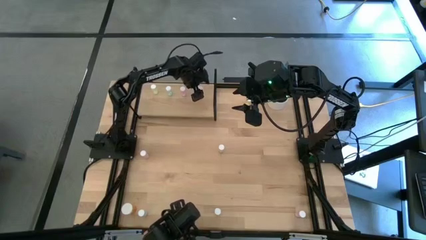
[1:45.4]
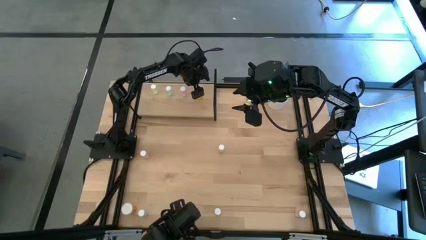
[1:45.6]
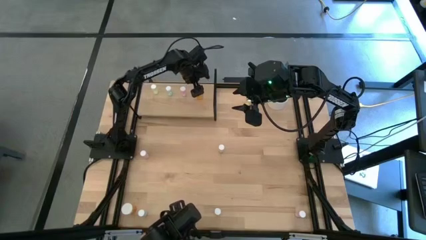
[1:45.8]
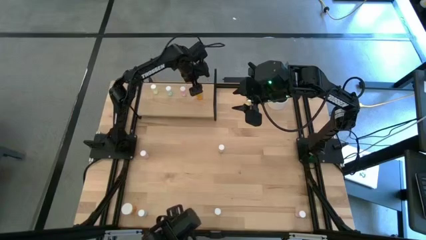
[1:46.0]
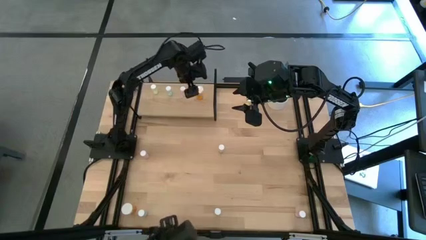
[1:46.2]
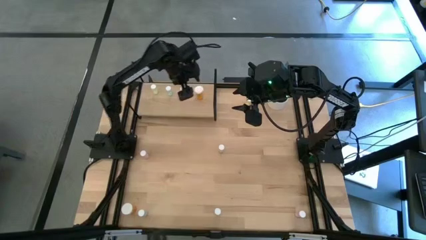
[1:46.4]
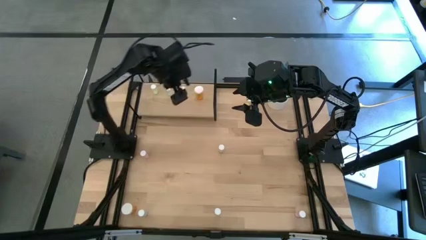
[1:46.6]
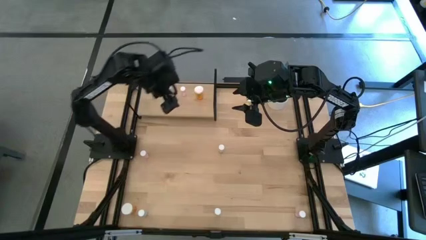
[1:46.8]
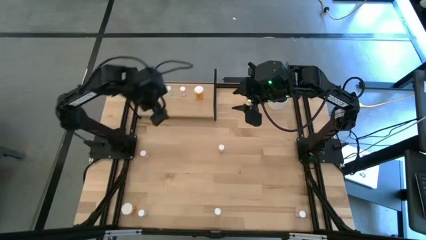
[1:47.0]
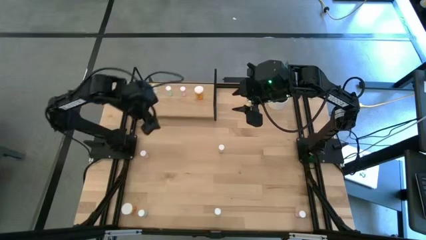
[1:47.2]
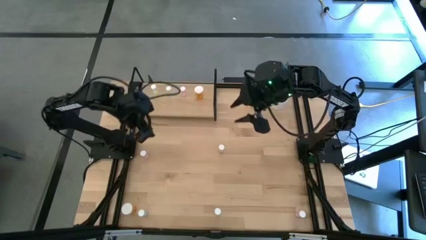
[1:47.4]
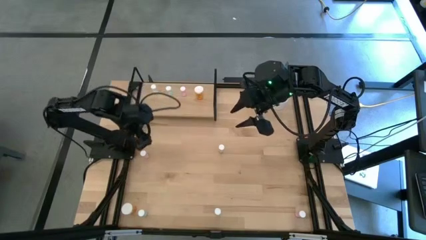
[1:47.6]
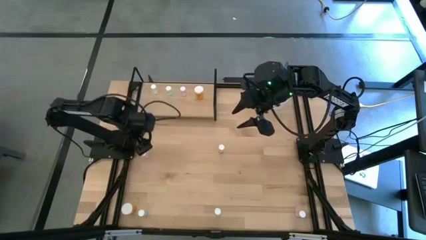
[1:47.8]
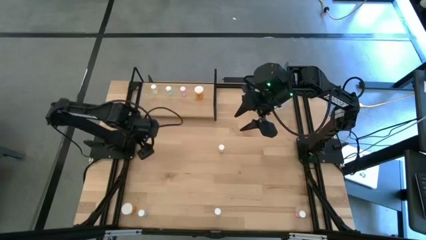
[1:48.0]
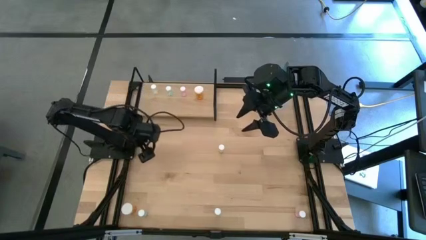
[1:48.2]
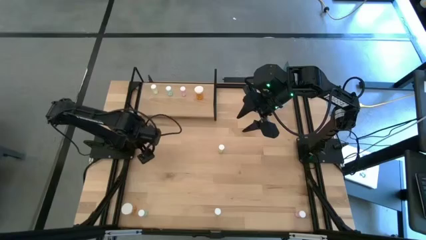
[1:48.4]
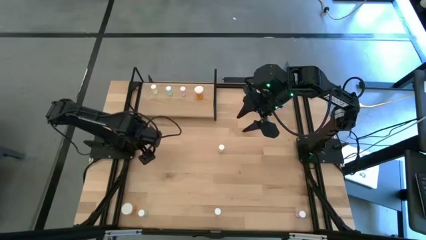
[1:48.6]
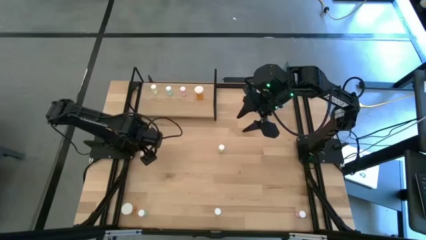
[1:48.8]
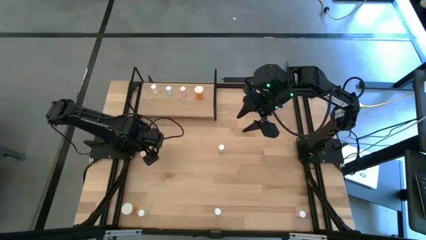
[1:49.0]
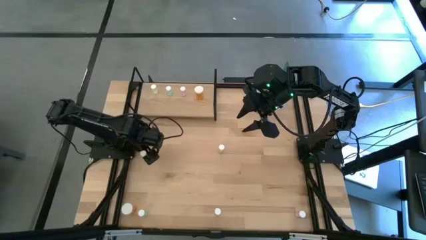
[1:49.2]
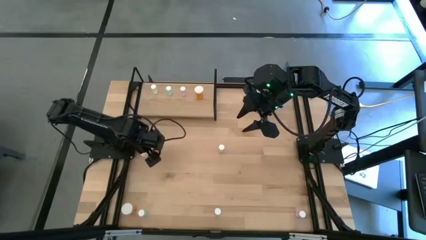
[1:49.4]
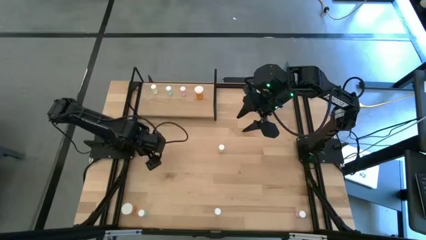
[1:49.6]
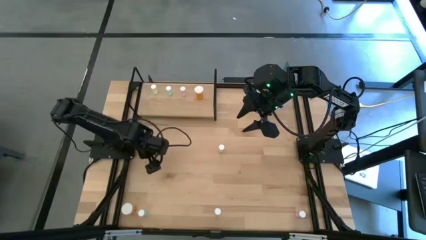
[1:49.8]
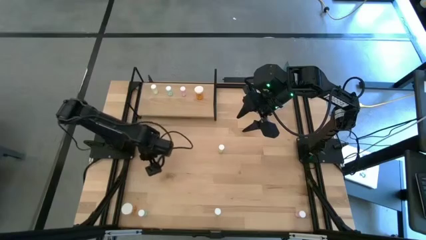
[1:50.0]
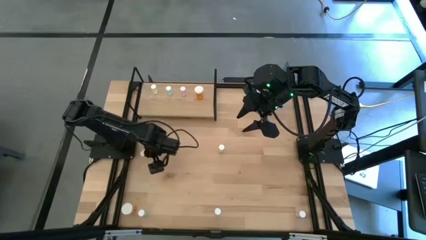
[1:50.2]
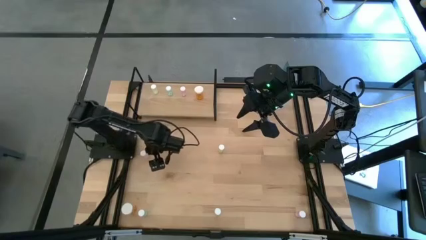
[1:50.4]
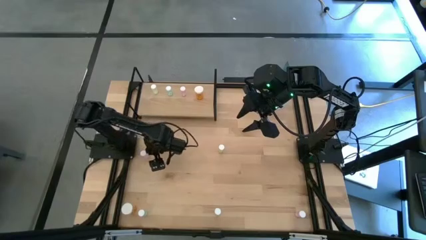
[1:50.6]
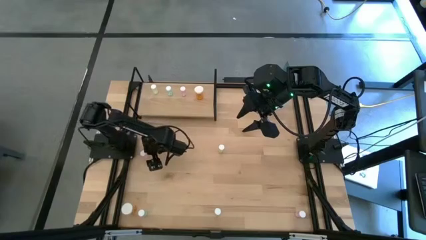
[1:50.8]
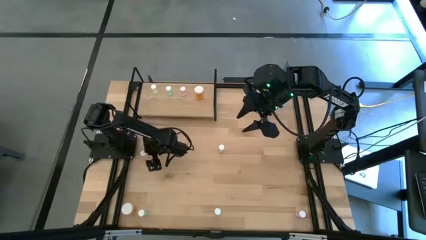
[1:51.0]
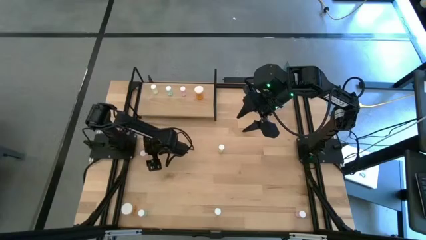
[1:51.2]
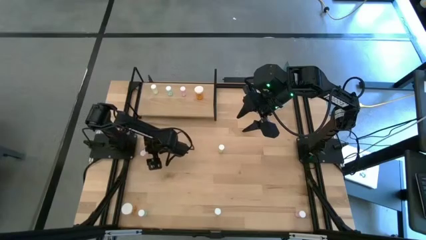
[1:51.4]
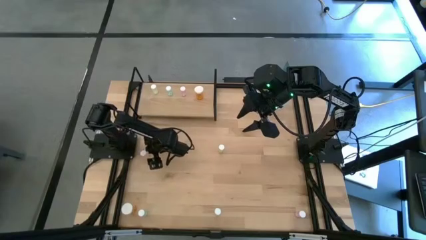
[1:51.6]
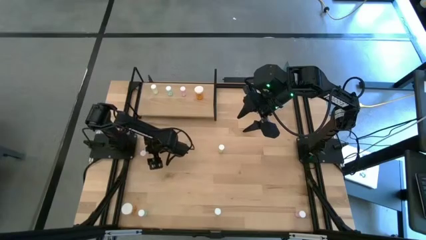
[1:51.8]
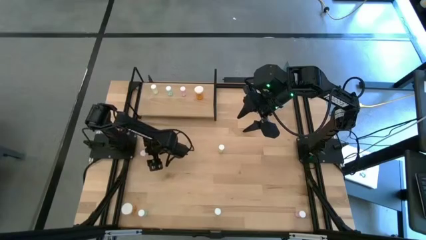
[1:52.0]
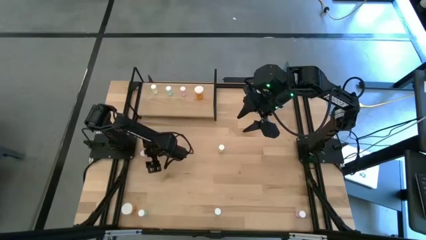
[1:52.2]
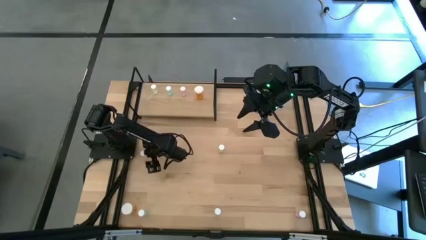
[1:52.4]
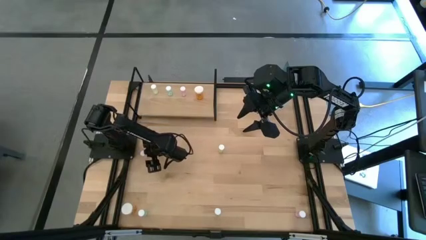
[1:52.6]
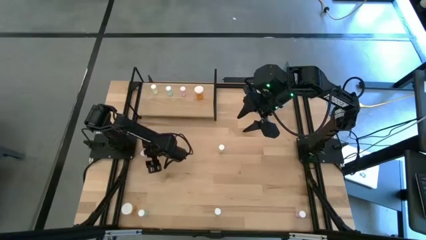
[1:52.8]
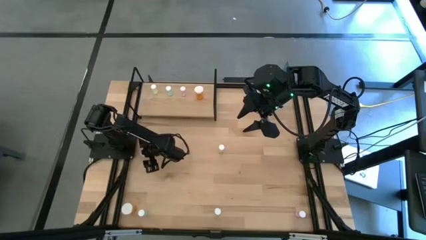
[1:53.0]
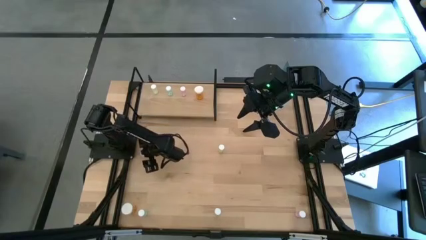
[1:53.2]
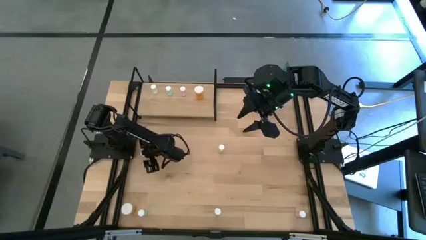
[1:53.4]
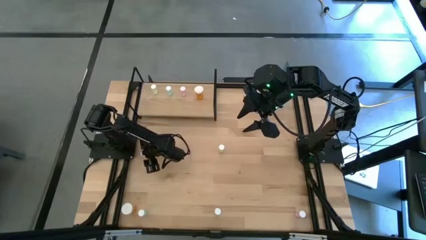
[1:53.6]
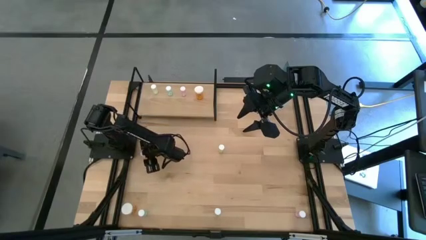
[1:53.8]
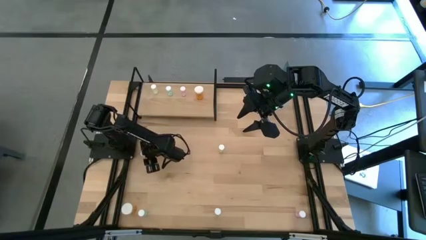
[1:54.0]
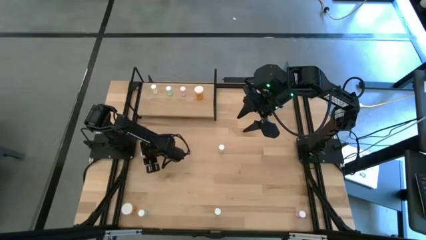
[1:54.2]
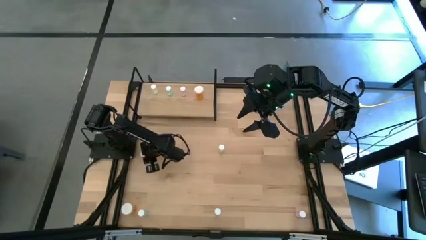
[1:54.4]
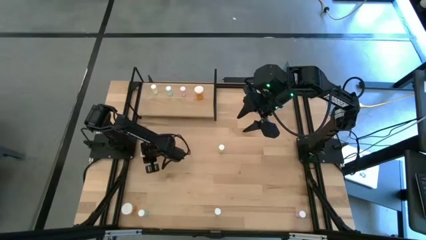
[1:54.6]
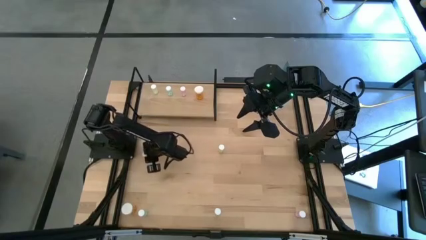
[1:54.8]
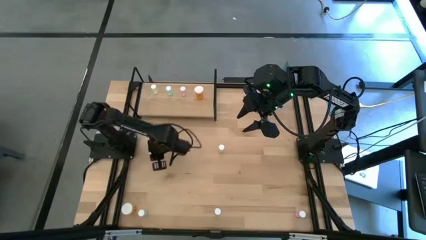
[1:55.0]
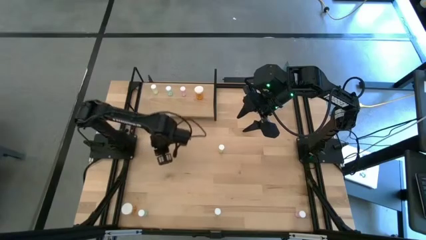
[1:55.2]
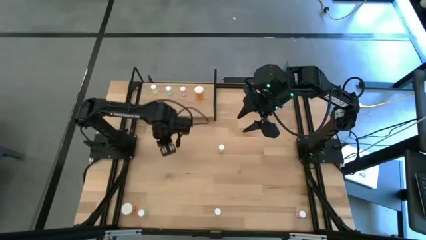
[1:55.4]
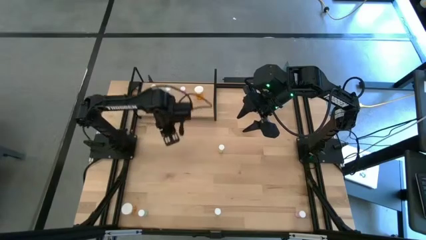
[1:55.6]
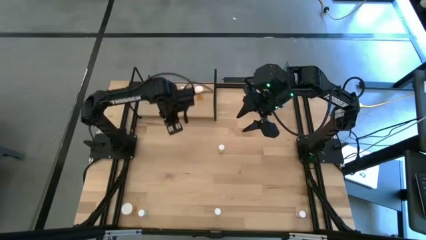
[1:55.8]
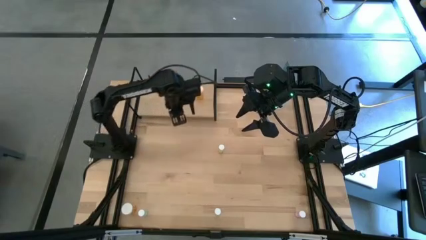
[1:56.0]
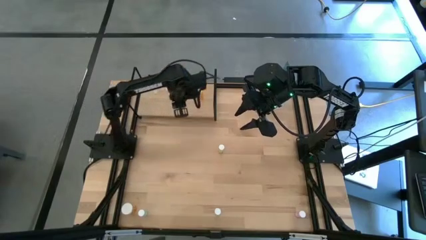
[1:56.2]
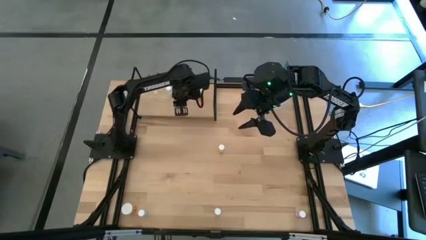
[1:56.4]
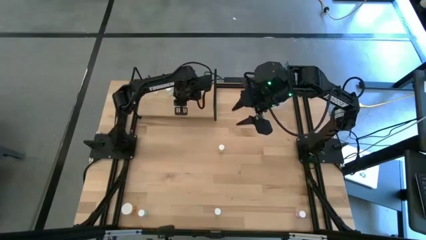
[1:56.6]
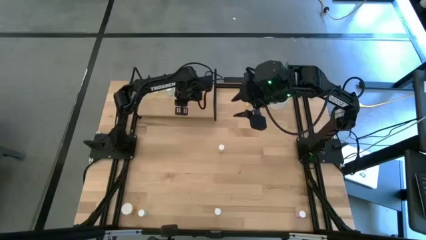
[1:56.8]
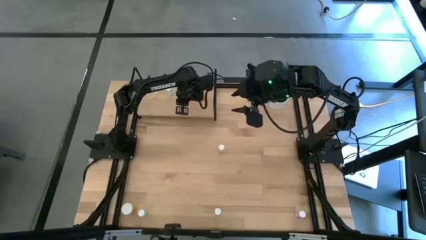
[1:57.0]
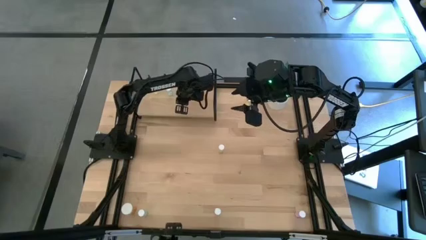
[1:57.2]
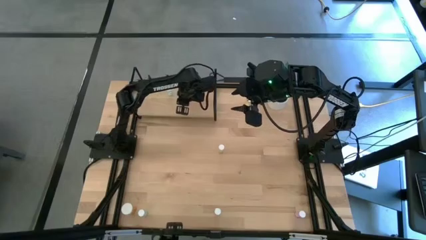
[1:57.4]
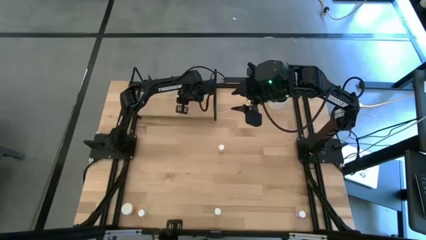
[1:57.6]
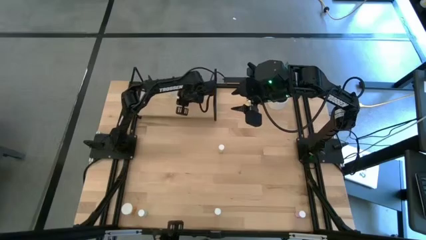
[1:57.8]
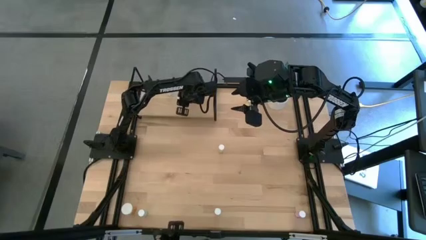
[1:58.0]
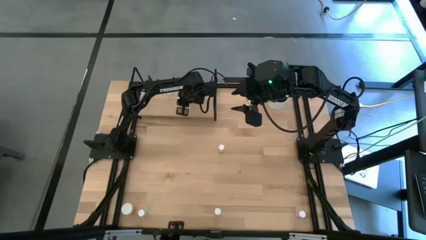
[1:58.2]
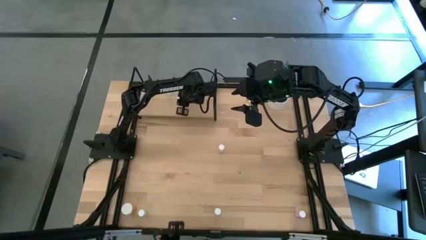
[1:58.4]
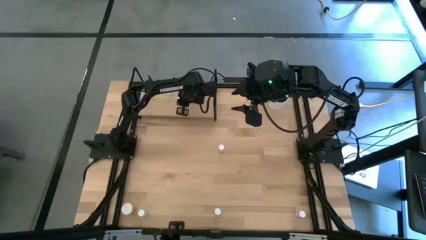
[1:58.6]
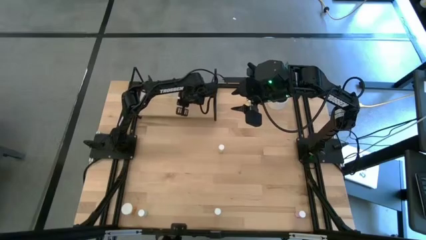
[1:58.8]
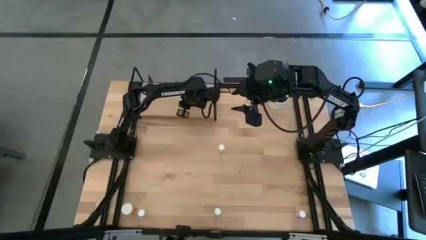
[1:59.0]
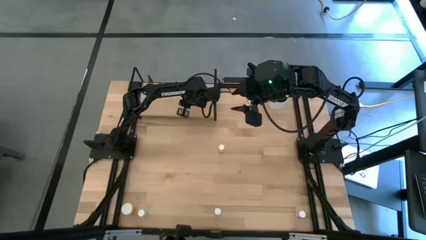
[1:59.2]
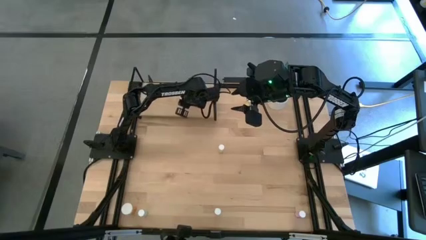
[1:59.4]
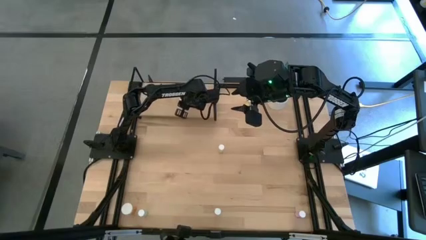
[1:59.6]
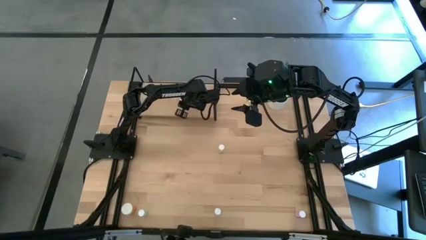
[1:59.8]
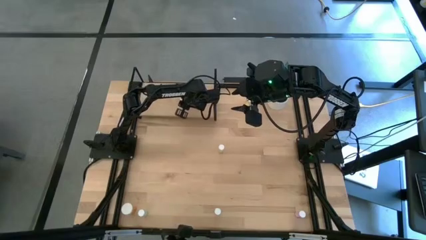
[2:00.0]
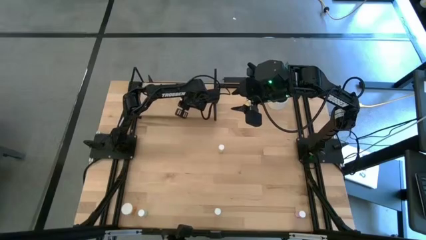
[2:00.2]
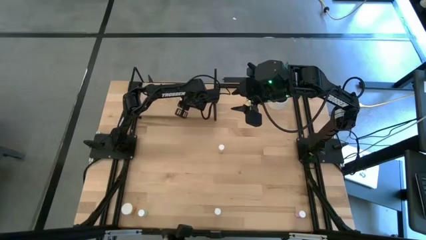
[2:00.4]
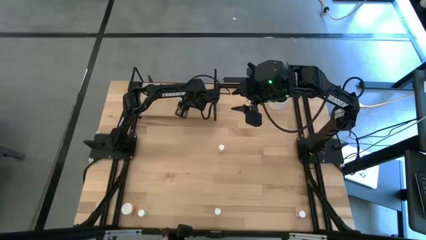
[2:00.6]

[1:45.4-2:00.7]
Task: Pick and place medicine bottles onto shelf by color
Put the left pink pill bottle on the shelf and align it with the other pink pill bottle

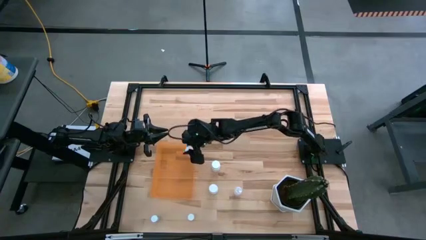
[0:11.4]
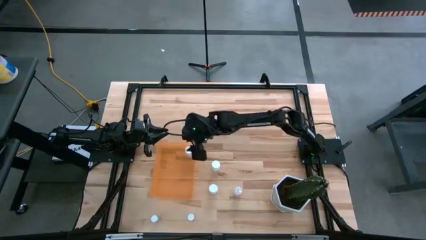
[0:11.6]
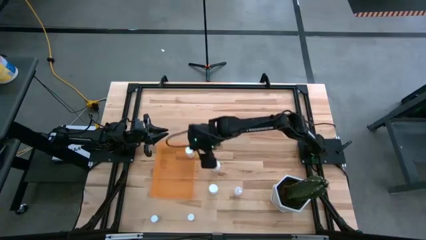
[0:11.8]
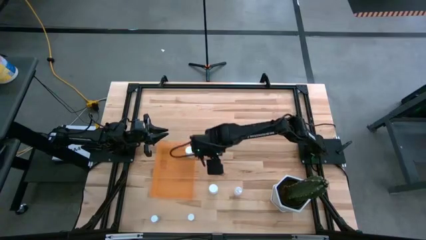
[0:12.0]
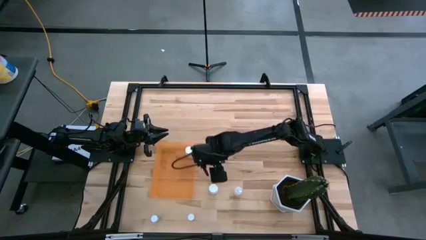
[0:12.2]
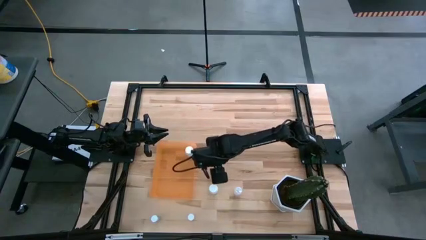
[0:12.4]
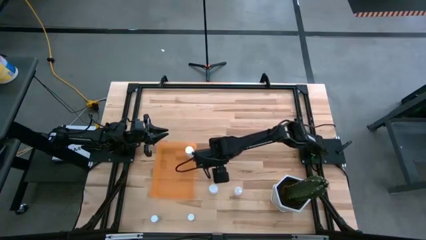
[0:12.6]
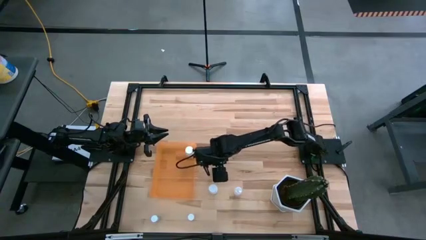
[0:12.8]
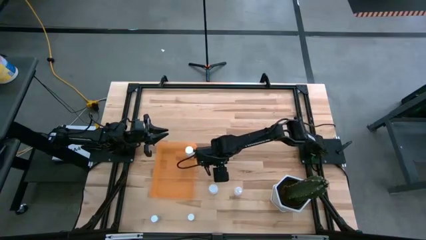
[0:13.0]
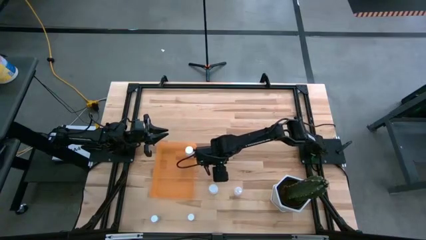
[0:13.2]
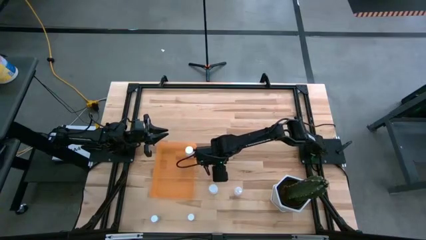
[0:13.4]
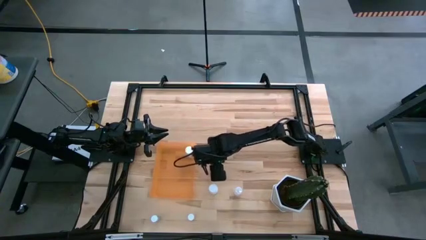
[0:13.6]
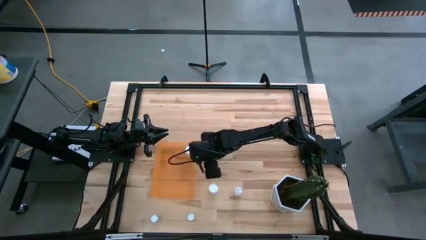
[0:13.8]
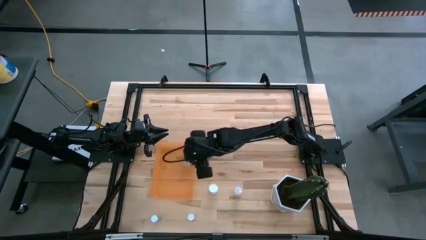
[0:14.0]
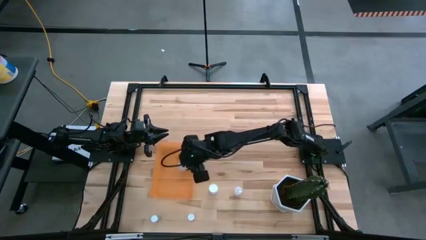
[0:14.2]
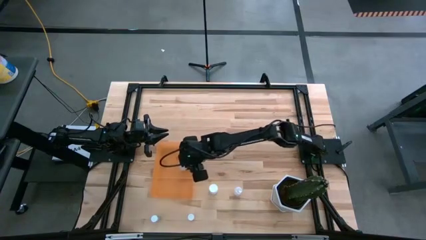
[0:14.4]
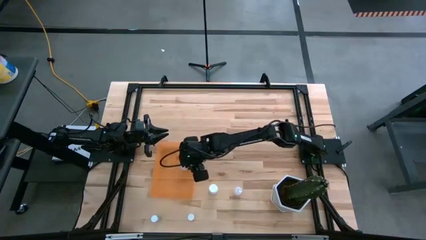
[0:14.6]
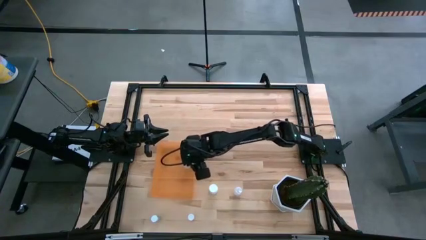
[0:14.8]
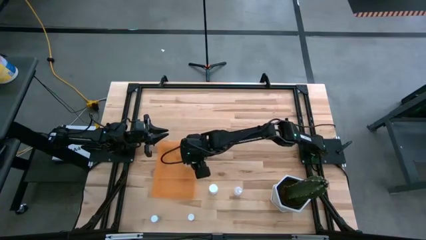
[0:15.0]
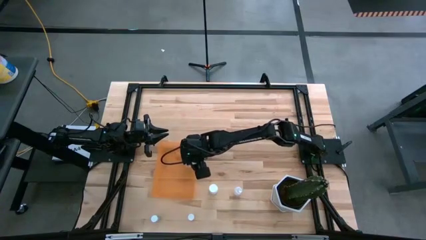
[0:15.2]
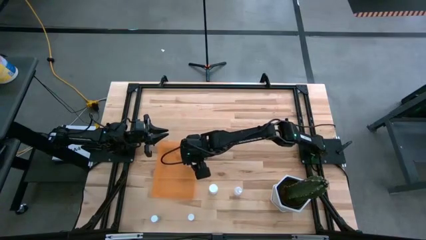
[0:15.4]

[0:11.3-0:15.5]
Task: Pick and place pill bottles into a basket
Put the top white pill bottle into the orange bin
